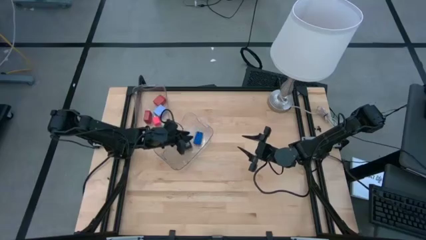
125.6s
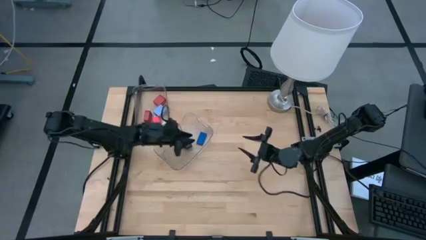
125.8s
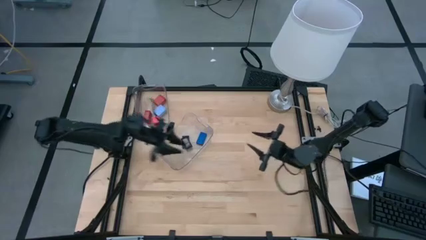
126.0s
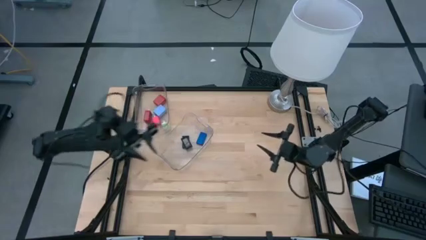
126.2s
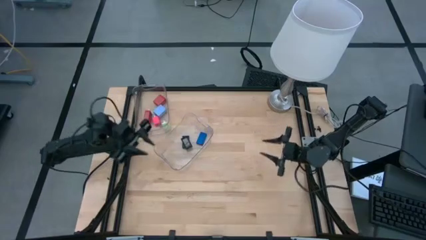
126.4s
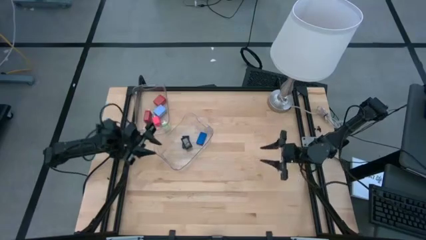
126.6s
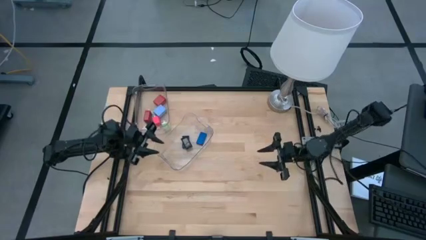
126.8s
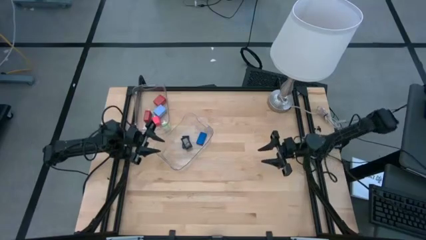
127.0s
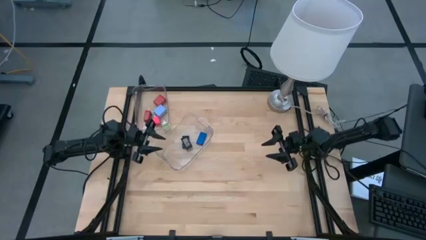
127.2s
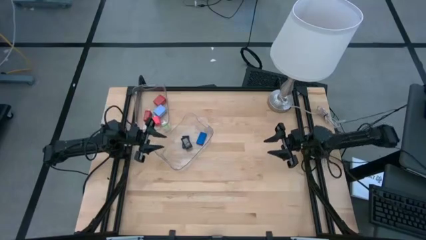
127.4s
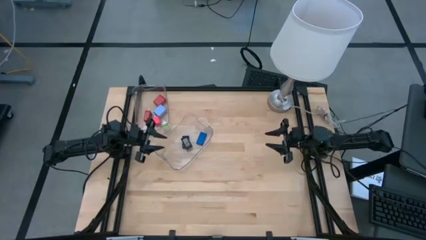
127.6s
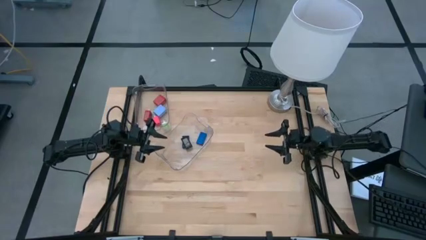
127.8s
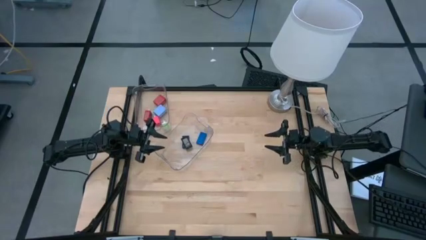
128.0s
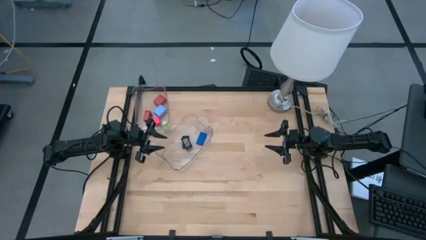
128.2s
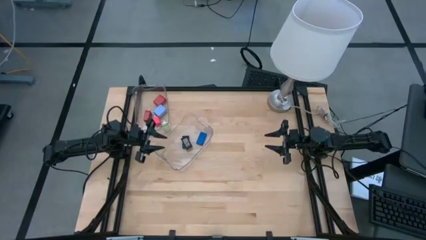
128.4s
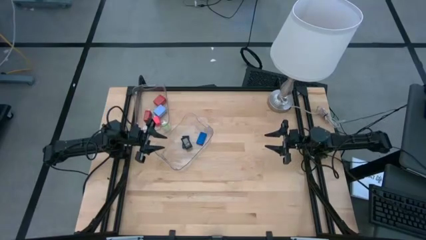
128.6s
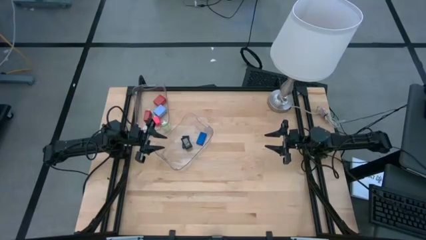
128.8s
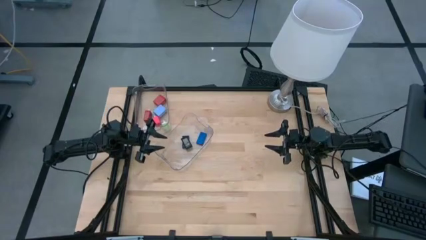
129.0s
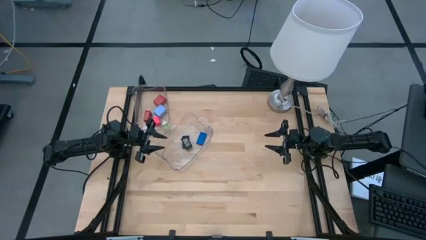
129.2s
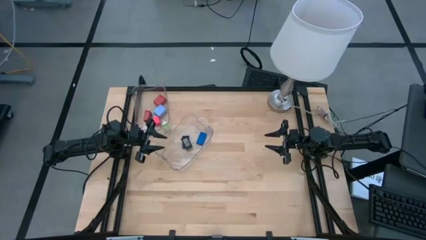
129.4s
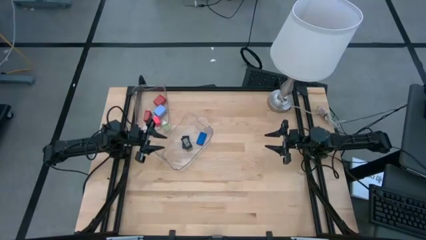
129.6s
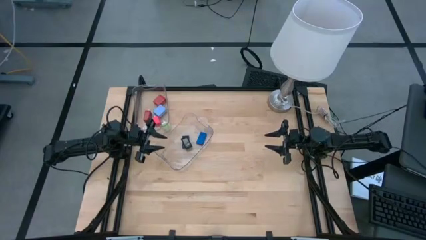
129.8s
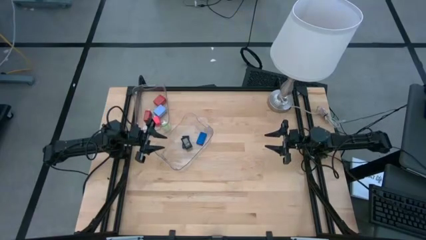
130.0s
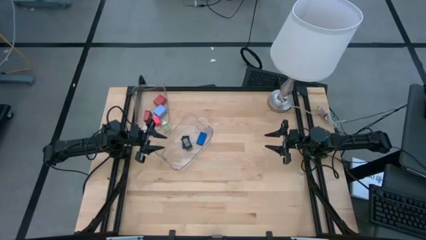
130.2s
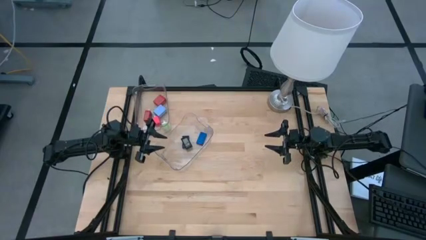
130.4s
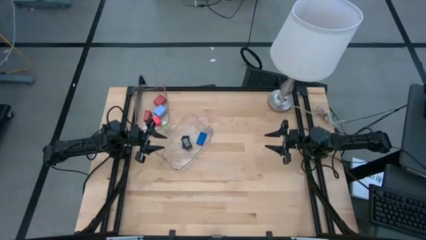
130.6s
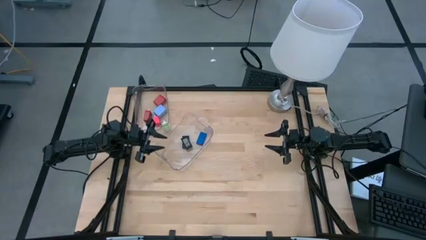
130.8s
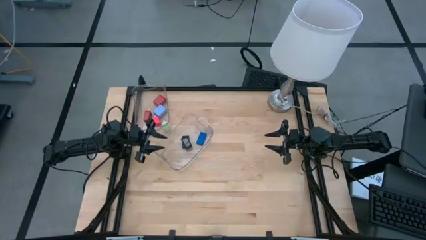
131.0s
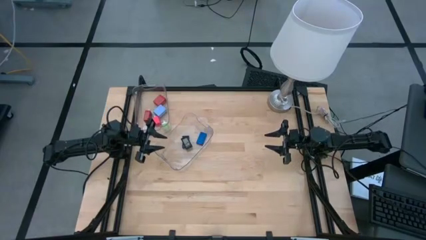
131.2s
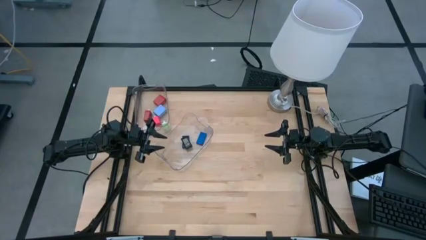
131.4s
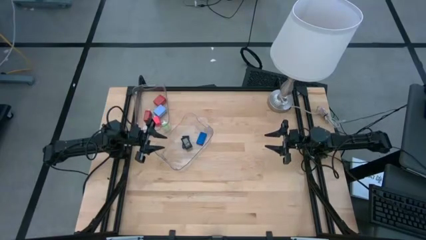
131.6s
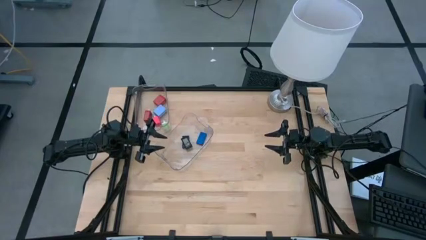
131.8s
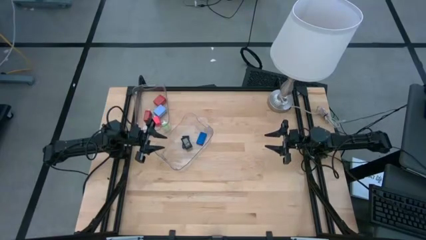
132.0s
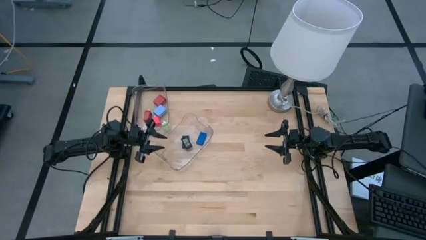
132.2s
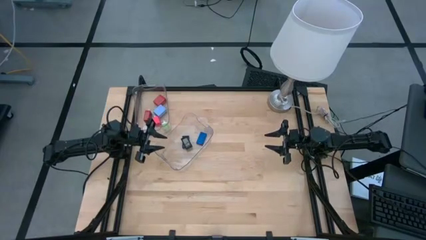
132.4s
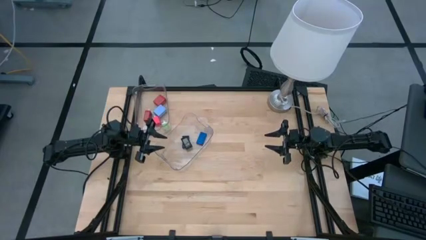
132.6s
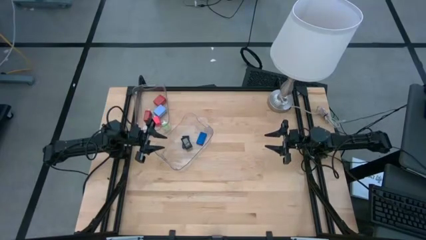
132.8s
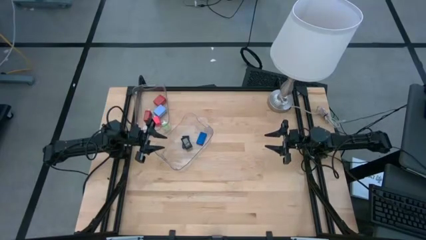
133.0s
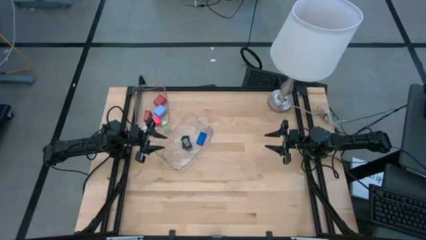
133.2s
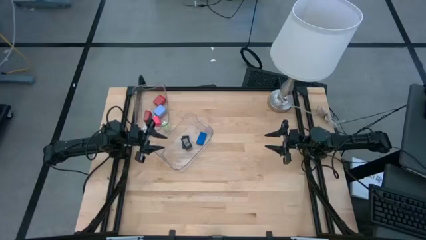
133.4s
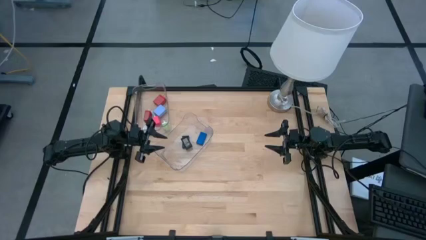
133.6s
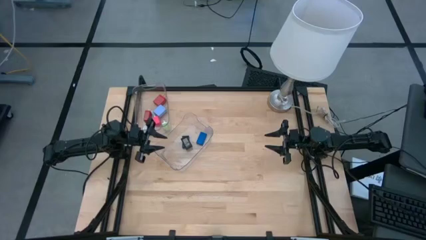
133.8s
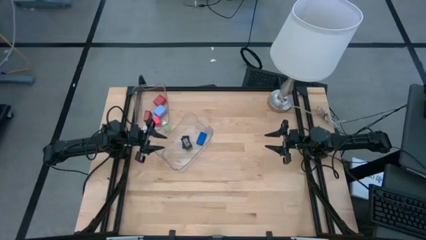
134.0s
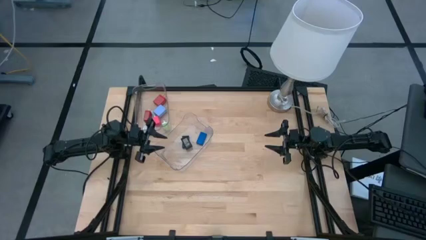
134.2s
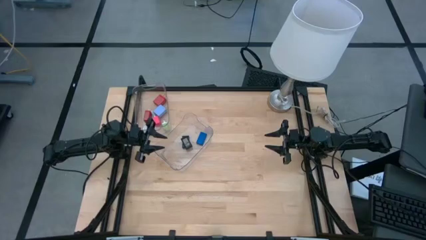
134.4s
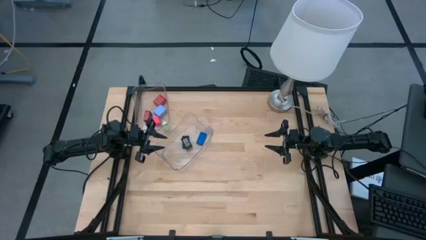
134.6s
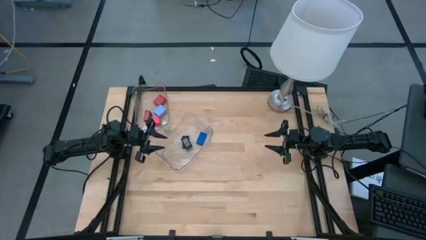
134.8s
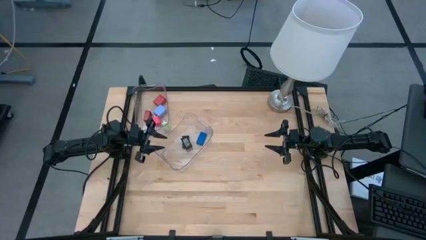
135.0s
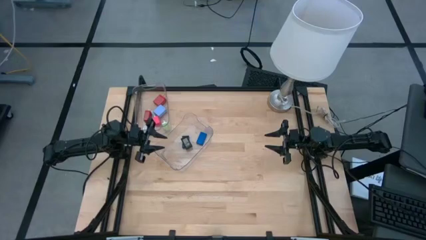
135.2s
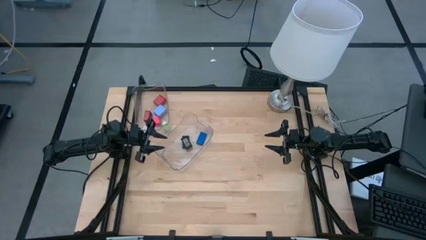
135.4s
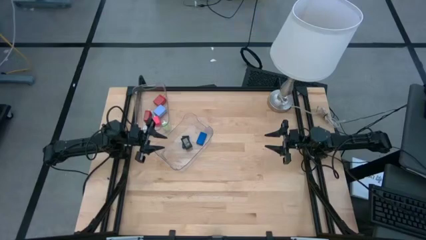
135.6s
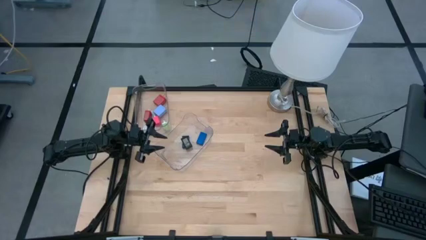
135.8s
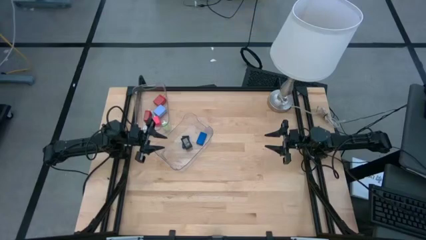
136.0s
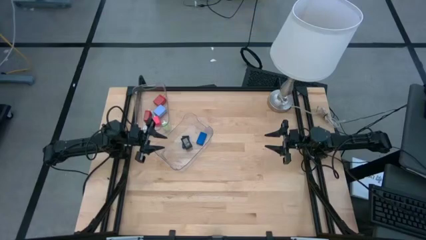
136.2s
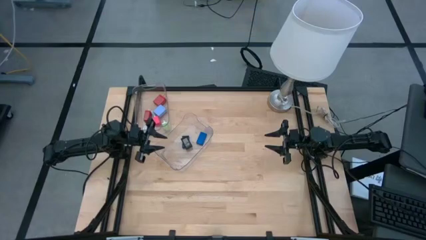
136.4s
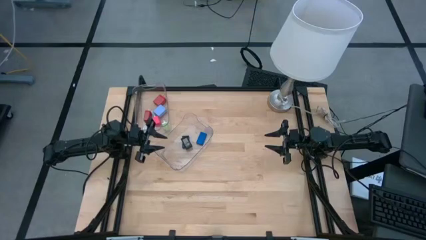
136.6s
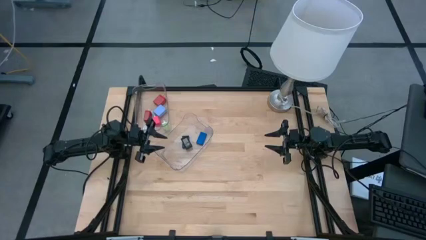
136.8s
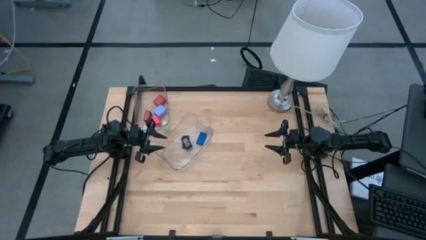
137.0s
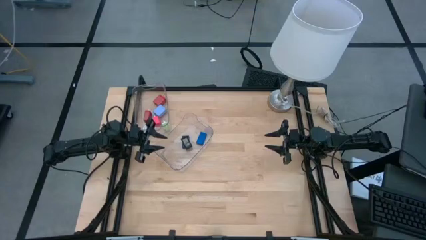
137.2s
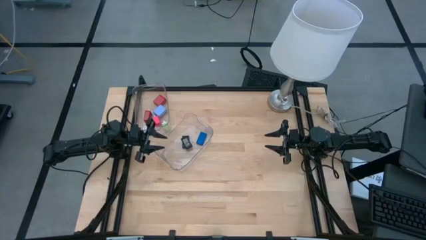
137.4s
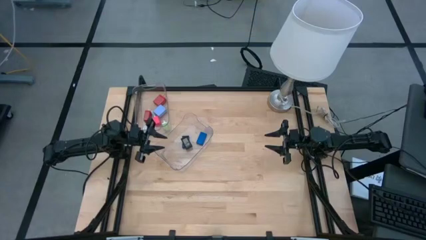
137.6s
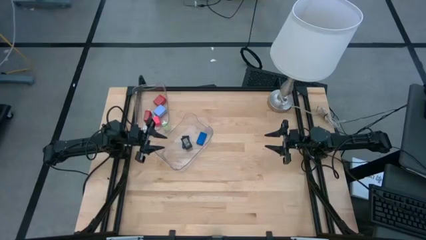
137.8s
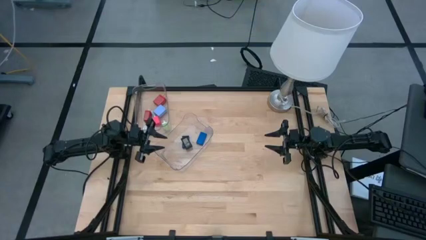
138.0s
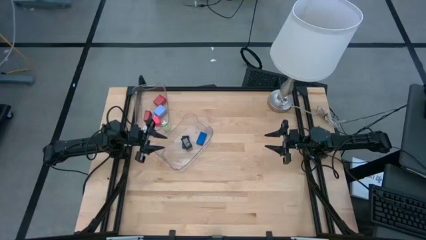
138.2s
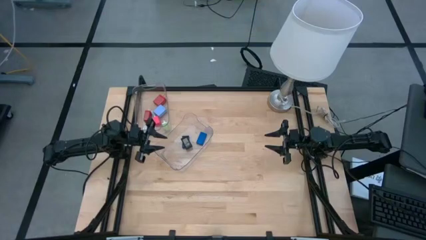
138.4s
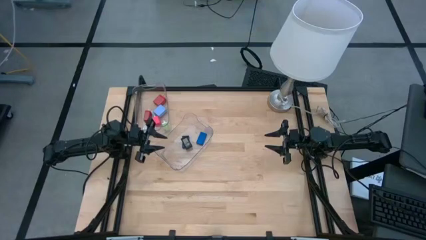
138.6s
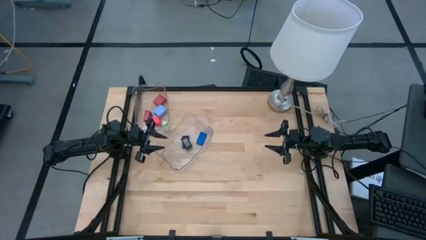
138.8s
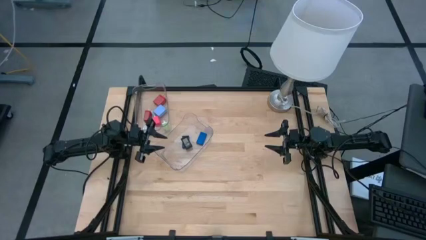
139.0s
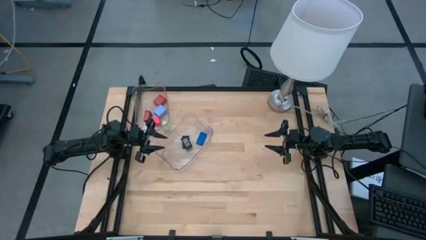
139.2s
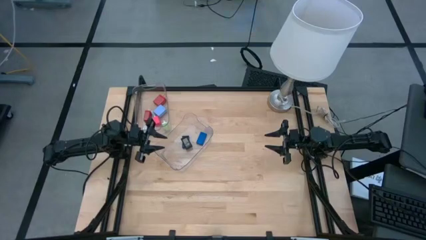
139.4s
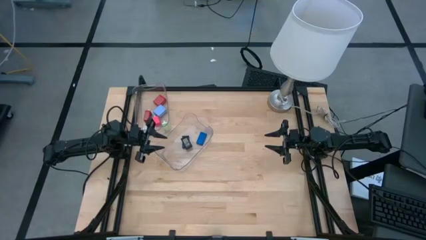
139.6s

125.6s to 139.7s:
Task: Pick & Place Office items
Return to Home Position

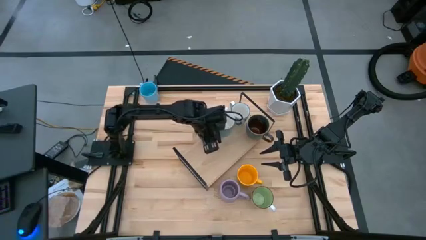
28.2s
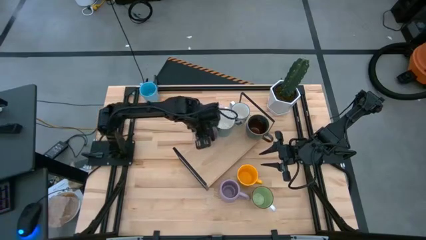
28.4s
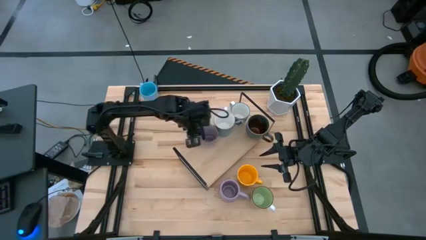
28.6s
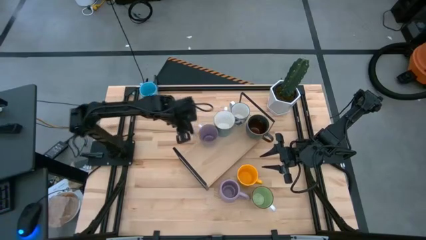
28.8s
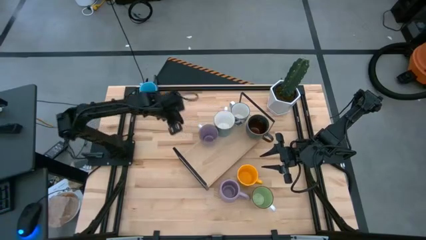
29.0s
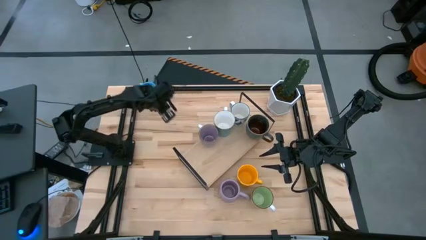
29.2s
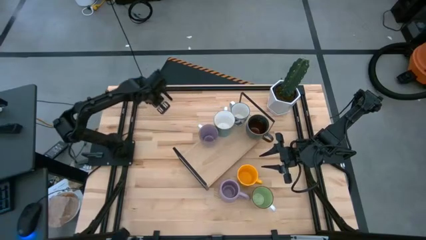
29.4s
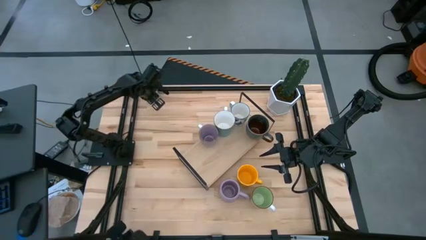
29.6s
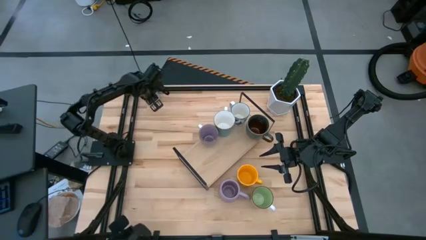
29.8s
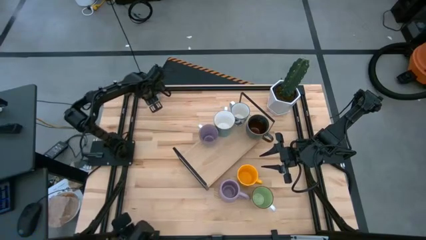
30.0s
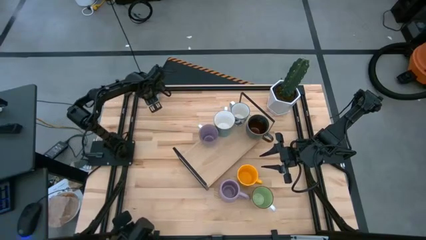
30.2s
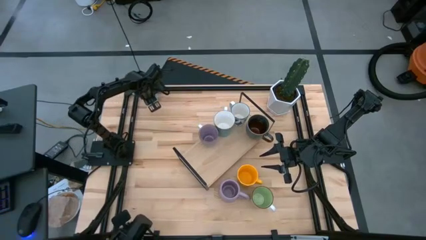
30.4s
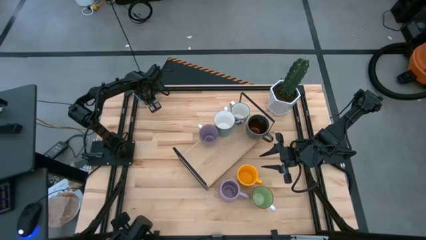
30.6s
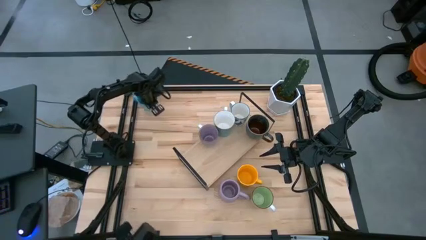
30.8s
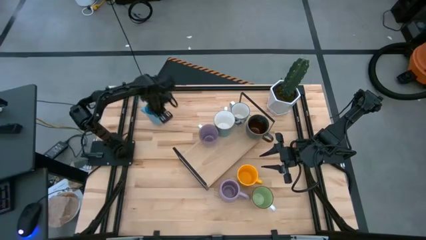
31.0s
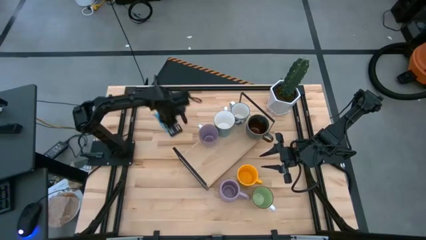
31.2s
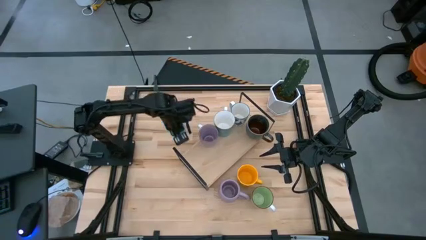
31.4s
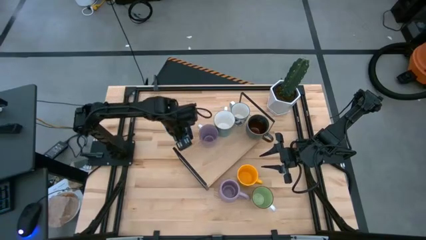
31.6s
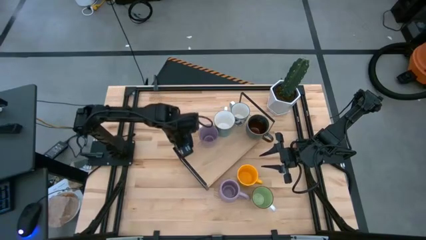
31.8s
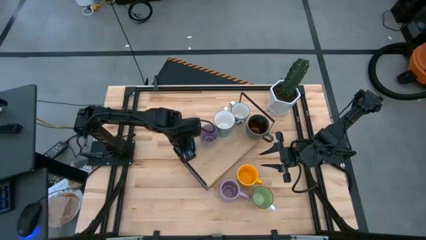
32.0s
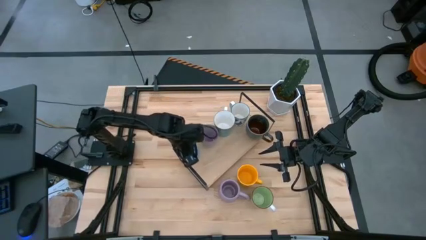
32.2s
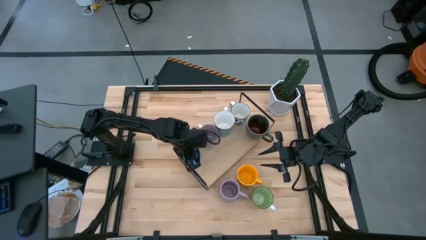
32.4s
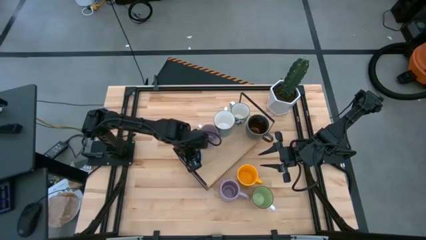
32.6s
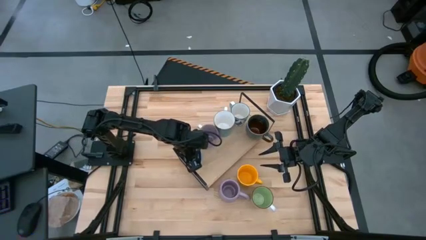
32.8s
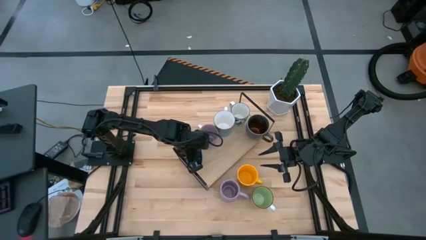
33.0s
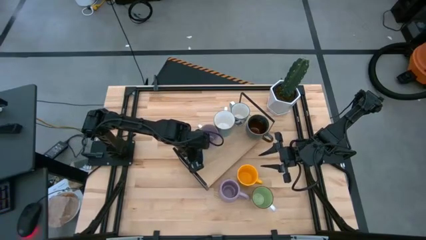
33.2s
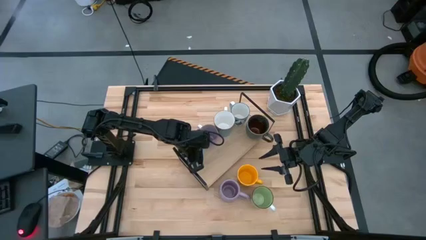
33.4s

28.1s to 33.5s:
Task: Place coffee mugs
Put the light blue mug on the shelf
